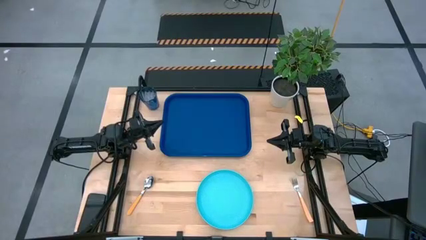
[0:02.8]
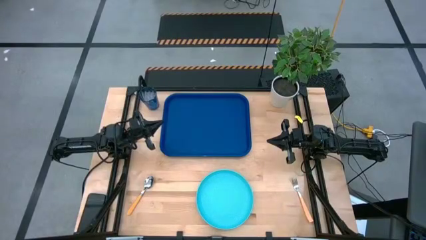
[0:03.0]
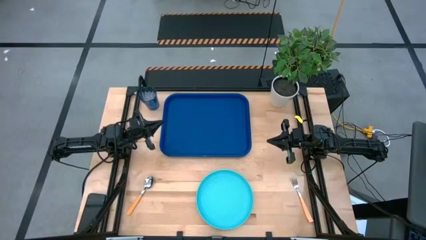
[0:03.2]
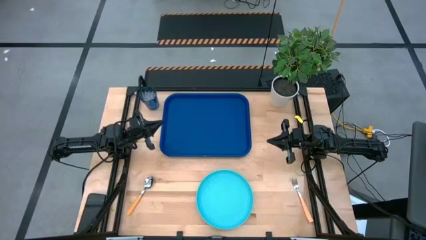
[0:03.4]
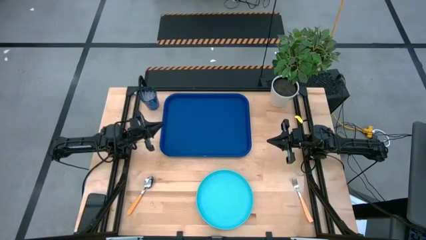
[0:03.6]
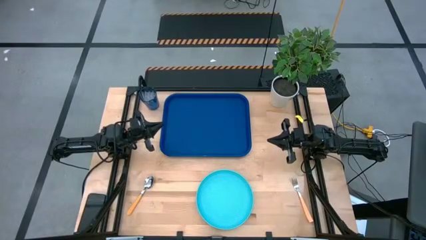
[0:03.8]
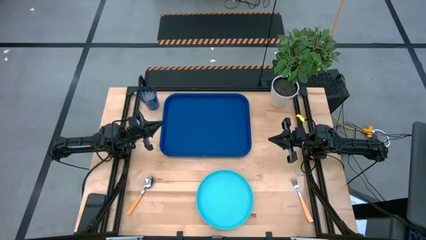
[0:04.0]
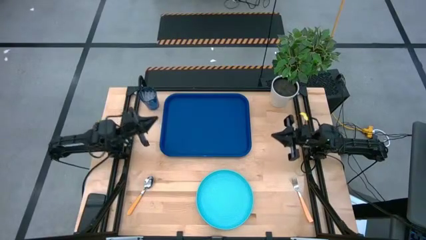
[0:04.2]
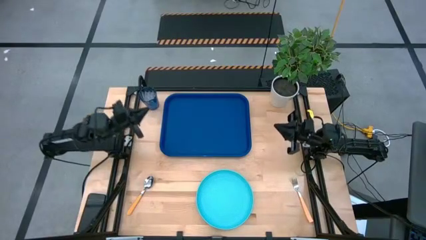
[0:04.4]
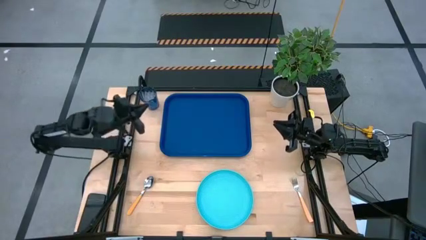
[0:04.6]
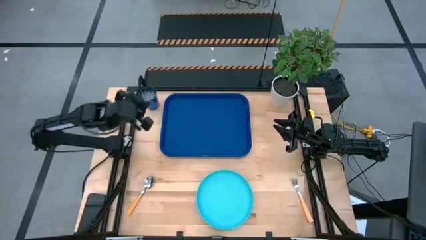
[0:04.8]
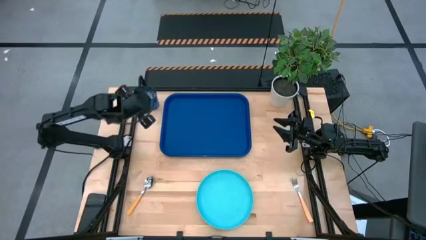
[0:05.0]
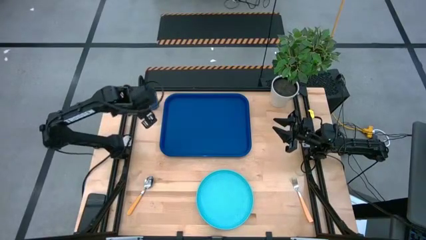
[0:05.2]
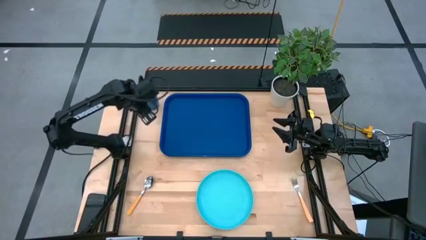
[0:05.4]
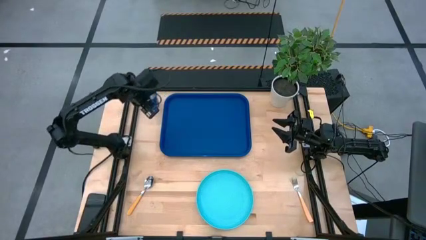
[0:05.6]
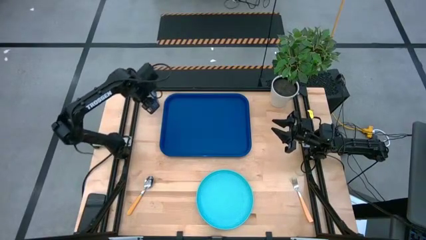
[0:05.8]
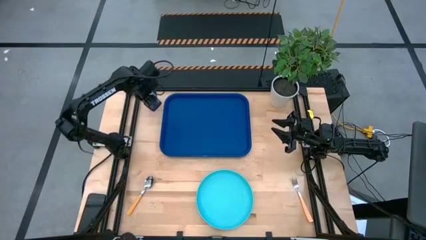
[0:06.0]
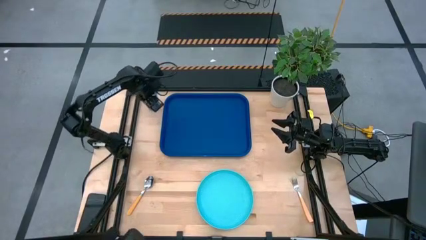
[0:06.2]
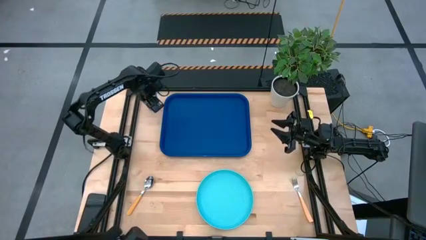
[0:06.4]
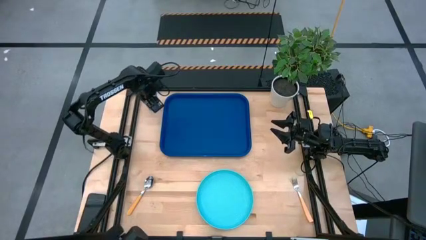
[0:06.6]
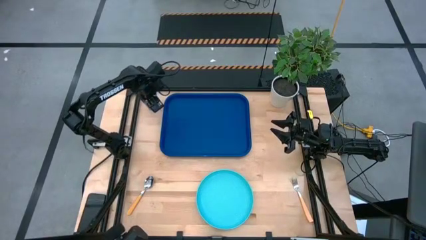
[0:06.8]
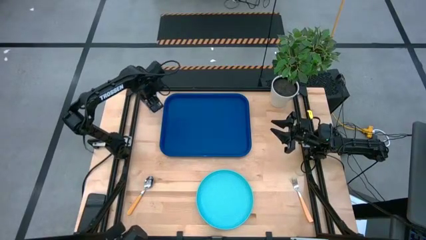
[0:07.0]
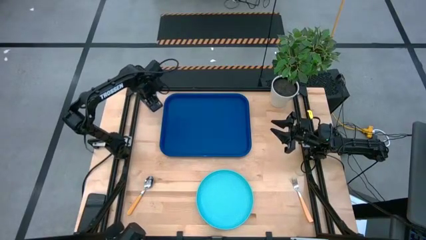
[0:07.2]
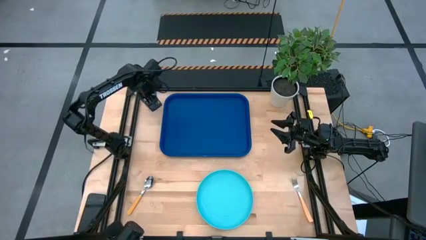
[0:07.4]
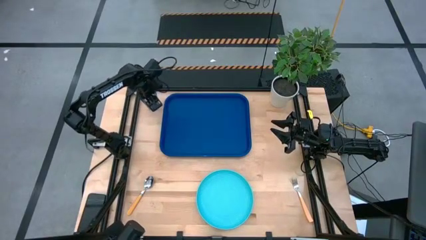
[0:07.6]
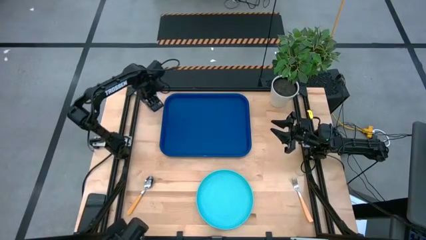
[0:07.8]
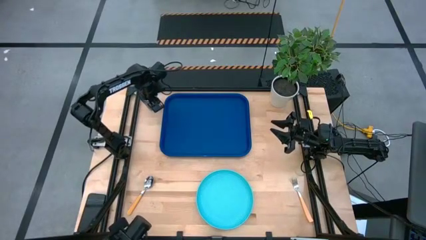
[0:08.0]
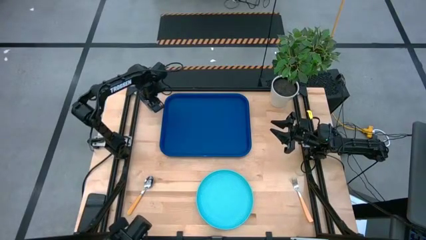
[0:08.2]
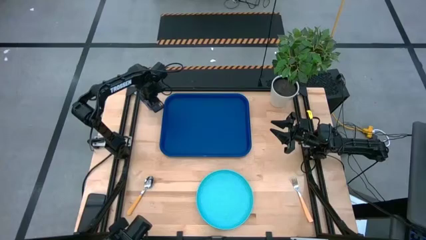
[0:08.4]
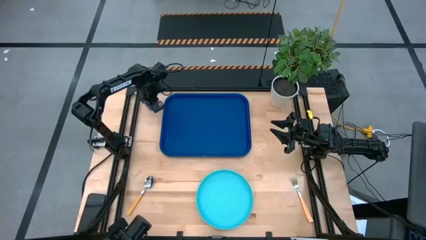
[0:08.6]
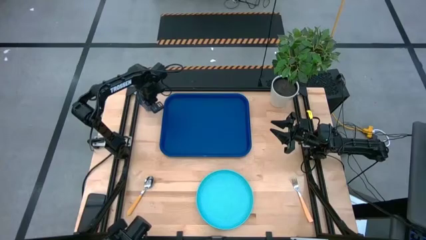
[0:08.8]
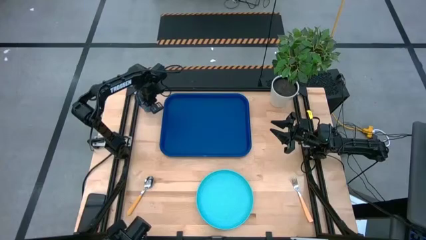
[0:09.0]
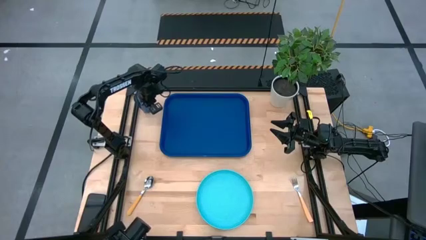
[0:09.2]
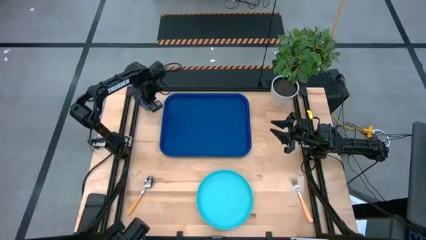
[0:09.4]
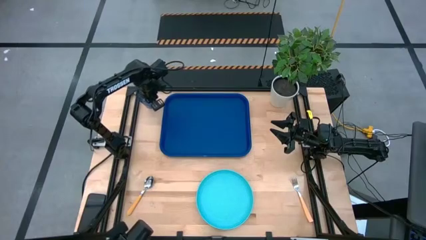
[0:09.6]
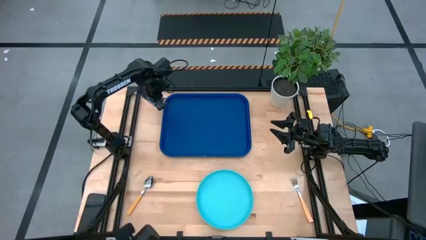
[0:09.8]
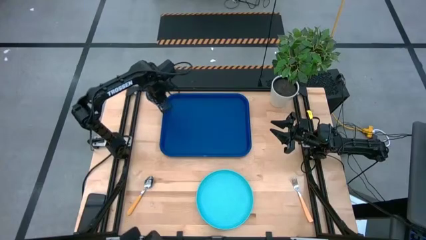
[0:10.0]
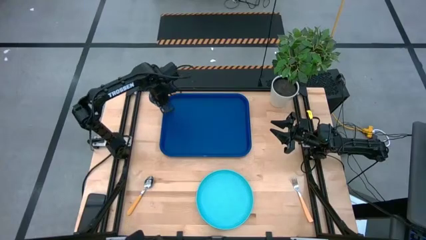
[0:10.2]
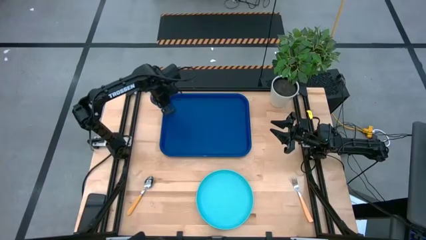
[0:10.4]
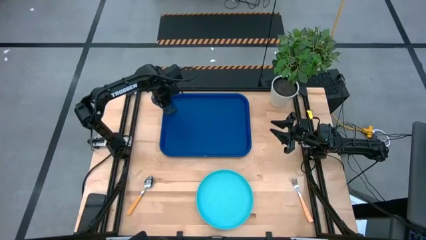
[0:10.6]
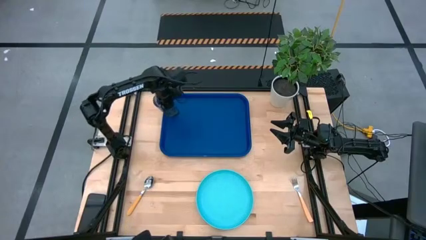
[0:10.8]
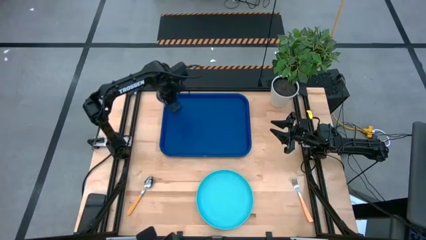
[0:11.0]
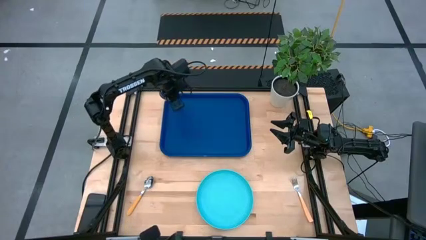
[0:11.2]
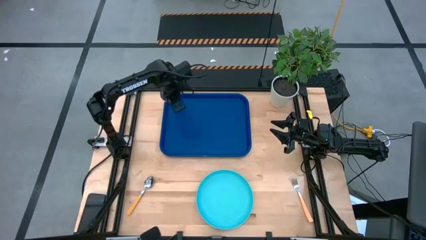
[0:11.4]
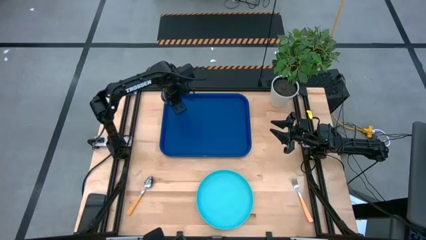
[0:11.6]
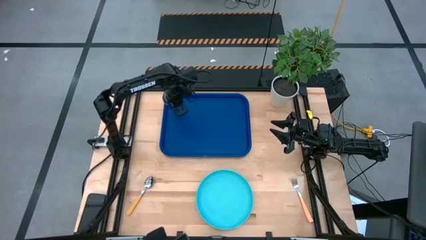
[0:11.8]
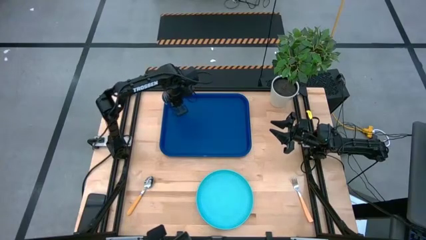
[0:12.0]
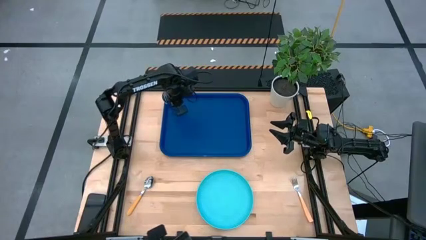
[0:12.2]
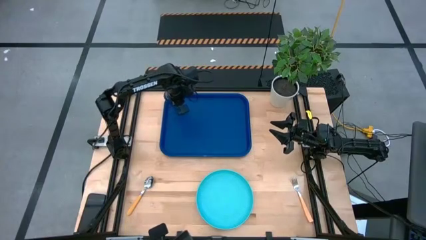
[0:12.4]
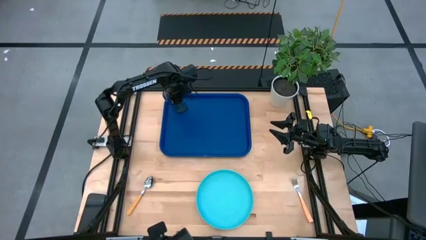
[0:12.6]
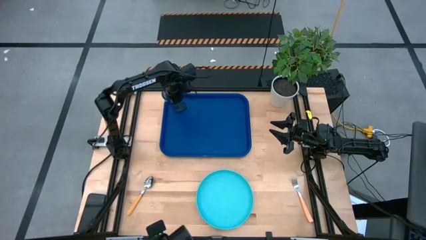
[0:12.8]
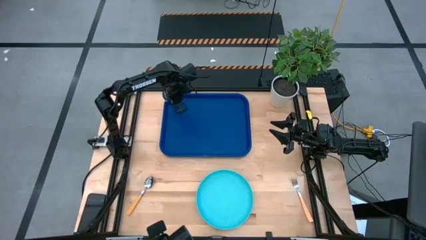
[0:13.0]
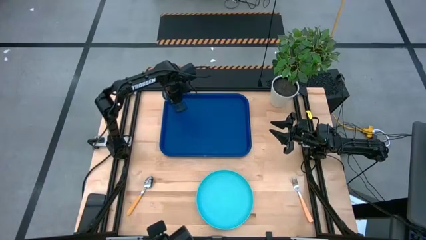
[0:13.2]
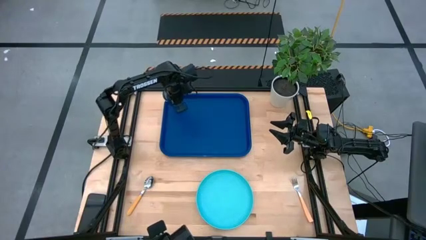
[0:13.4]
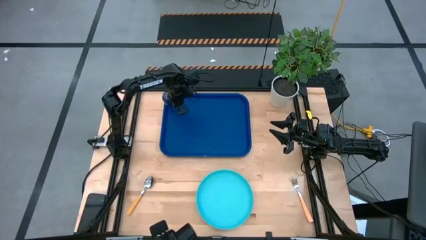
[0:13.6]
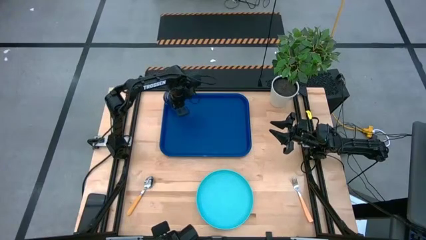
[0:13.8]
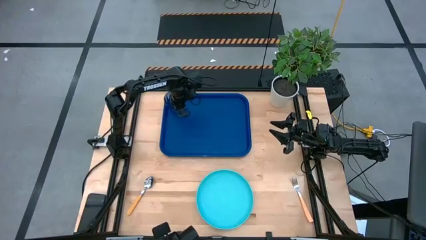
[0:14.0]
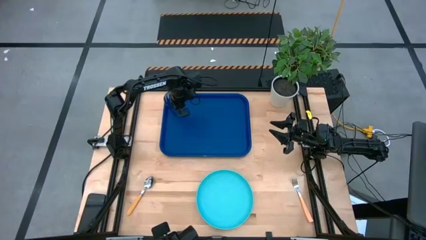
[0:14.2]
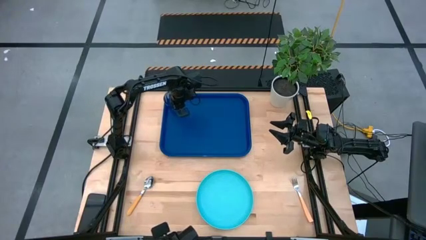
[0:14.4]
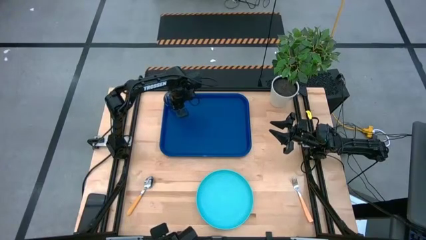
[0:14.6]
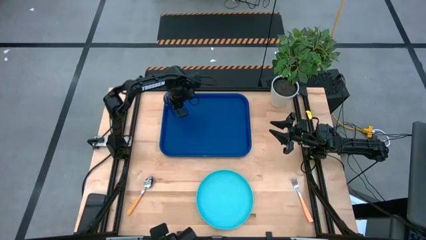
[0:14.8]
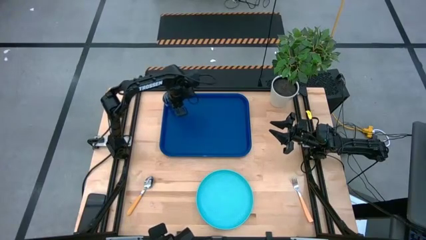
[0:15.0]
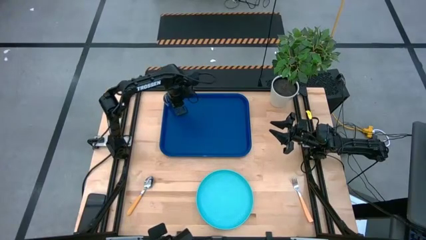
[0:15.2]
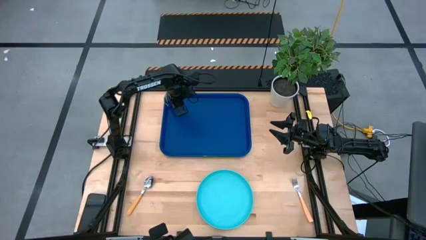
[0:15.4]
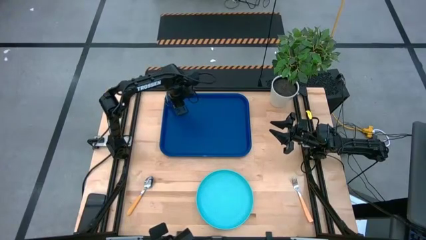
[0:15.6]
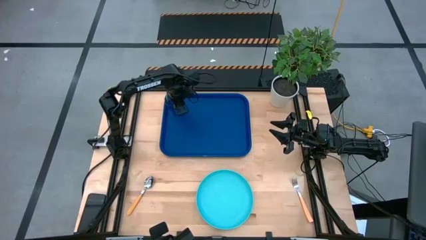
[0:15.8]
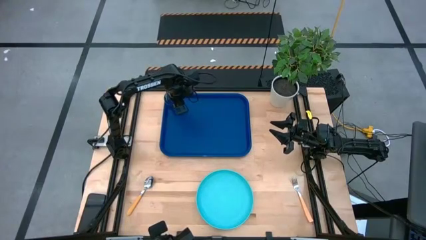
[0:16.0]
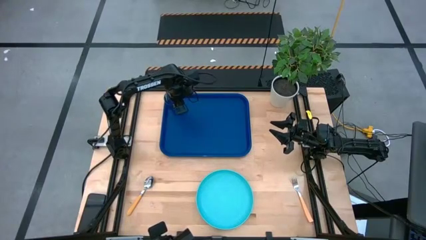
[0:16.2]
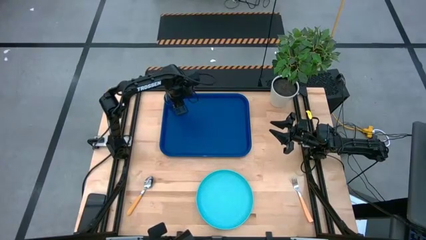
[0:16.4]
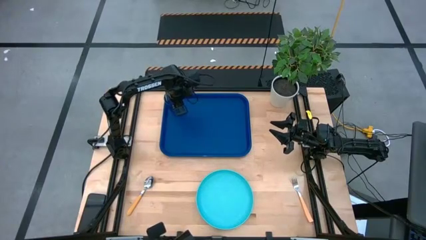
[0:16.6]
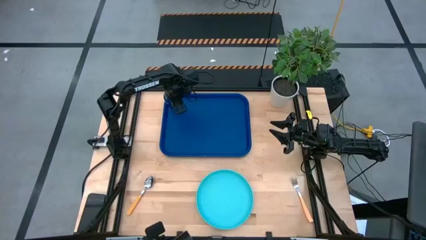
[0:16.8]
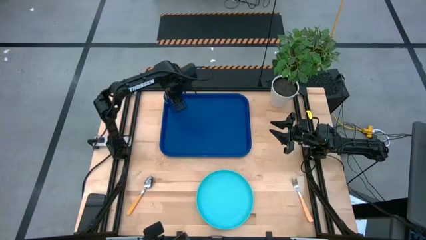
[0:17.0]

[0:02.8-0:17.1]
Task: Pick and place plate/cup/fork/spoon on tray
Put the blue glass on the top left of the serving tray
